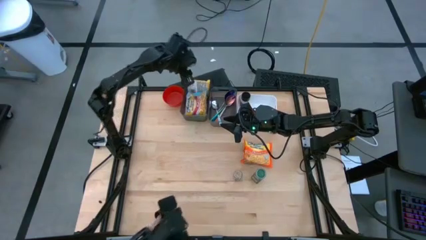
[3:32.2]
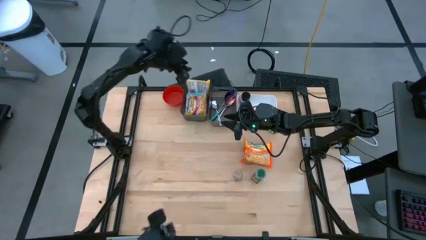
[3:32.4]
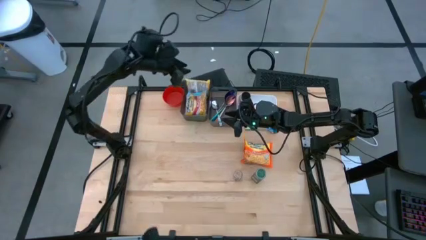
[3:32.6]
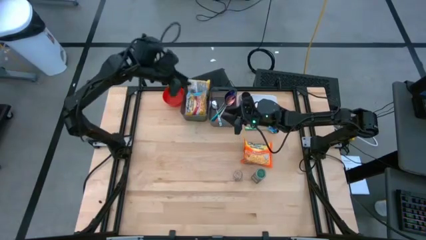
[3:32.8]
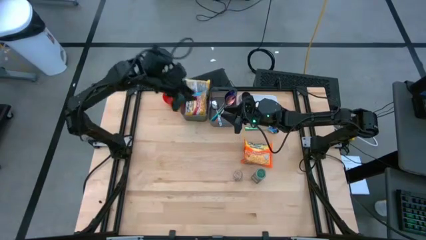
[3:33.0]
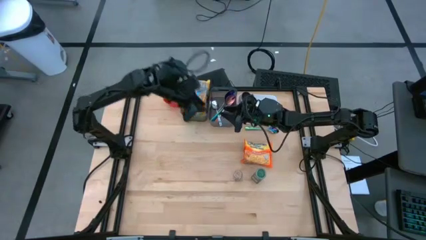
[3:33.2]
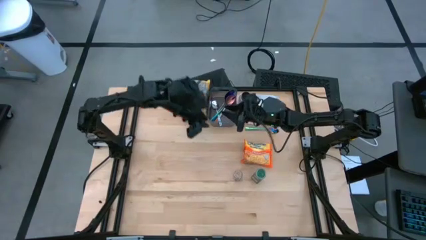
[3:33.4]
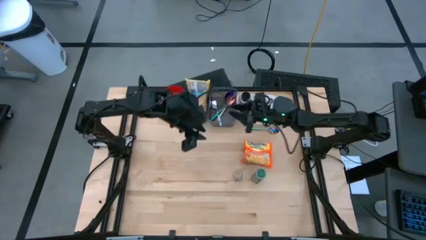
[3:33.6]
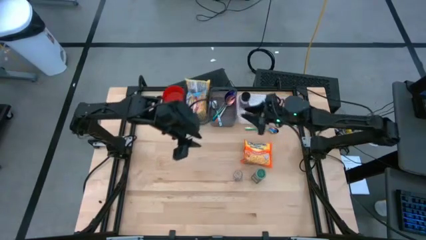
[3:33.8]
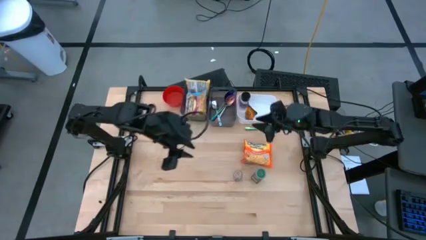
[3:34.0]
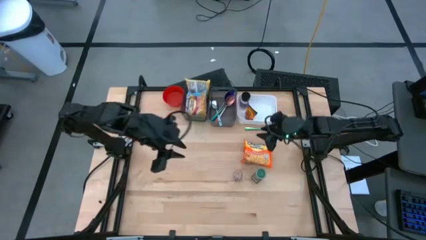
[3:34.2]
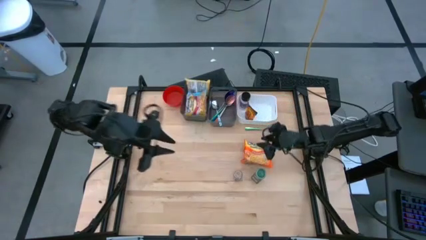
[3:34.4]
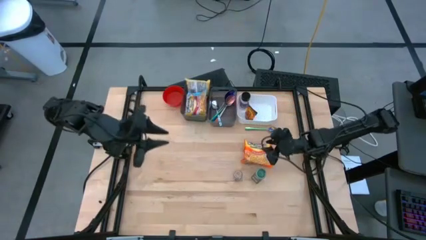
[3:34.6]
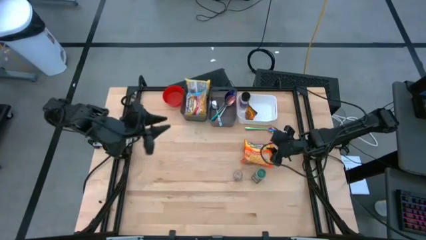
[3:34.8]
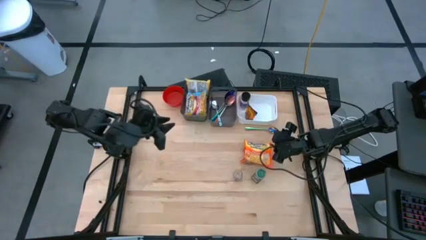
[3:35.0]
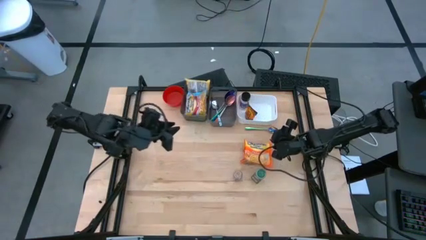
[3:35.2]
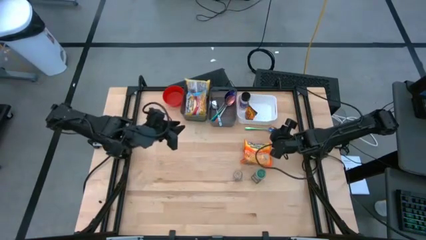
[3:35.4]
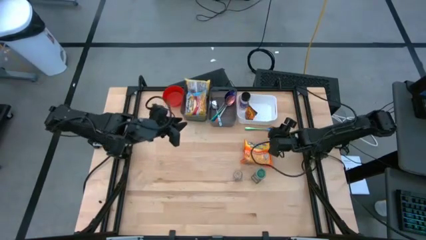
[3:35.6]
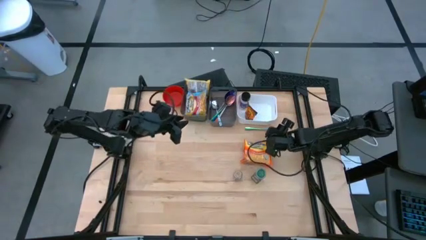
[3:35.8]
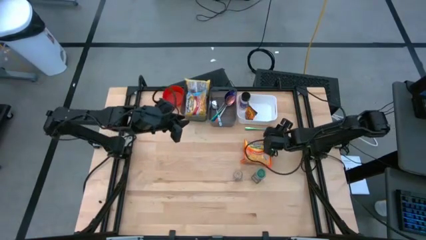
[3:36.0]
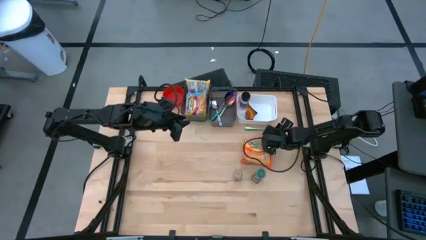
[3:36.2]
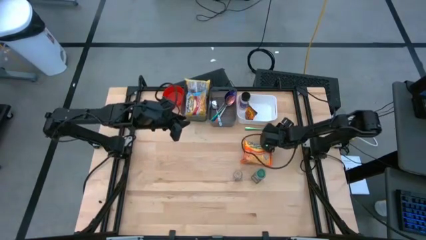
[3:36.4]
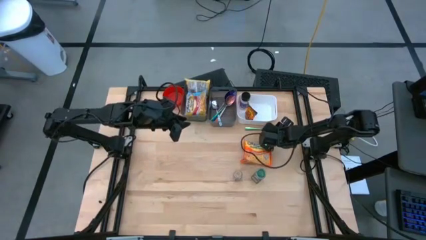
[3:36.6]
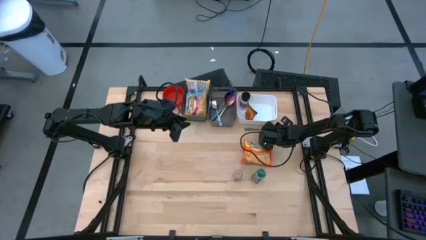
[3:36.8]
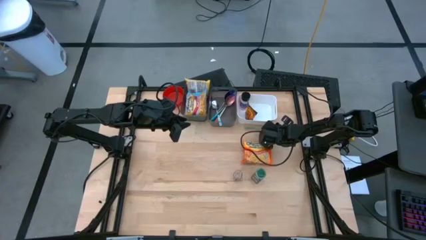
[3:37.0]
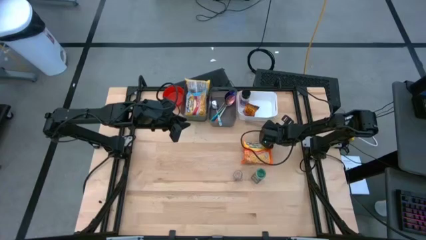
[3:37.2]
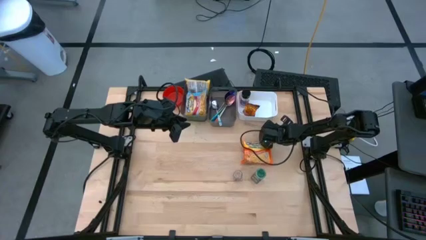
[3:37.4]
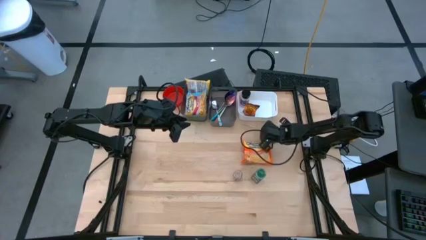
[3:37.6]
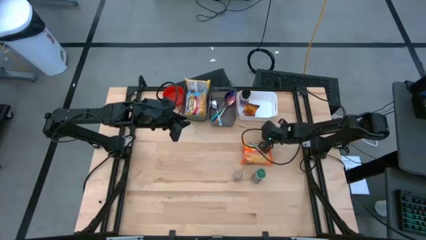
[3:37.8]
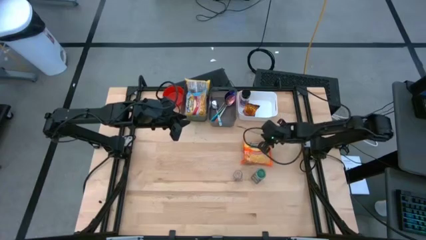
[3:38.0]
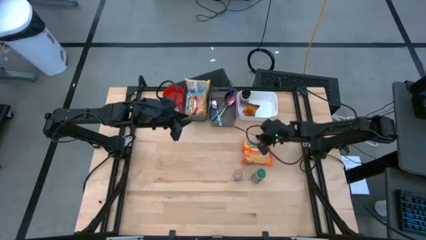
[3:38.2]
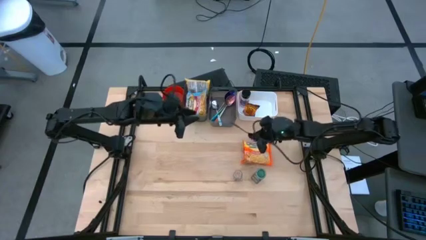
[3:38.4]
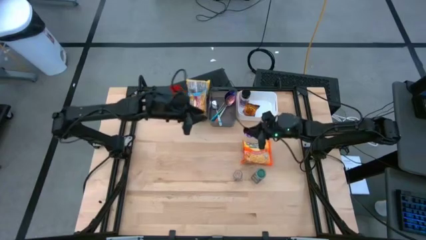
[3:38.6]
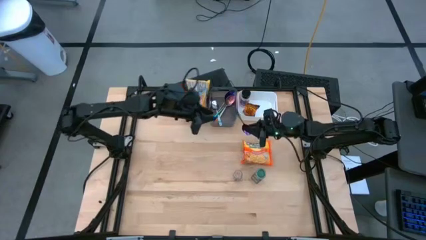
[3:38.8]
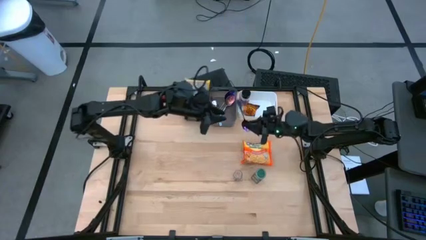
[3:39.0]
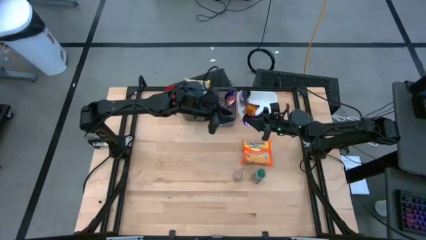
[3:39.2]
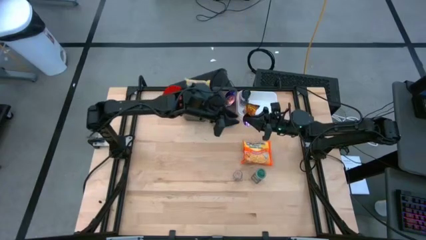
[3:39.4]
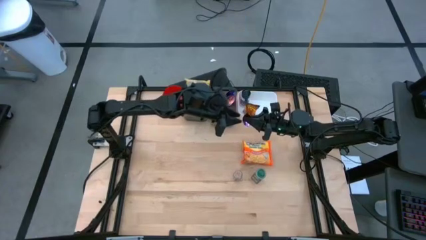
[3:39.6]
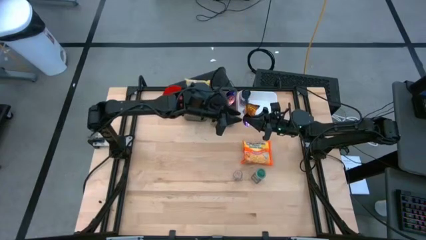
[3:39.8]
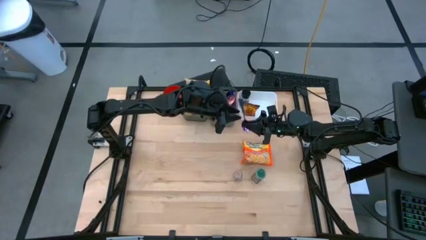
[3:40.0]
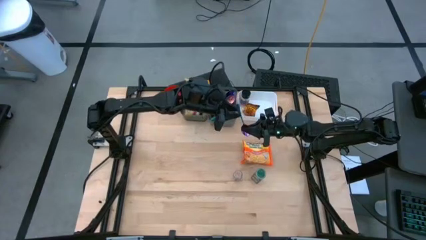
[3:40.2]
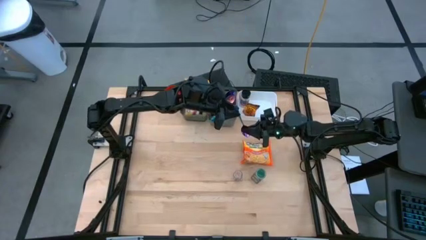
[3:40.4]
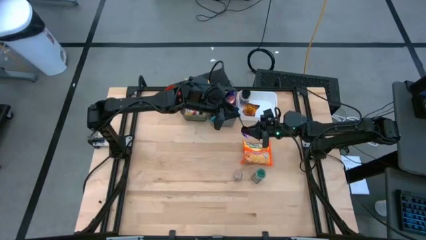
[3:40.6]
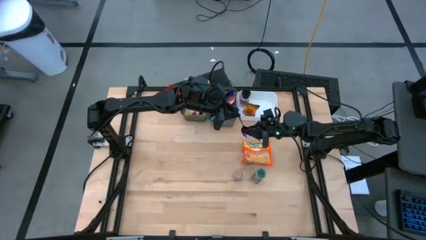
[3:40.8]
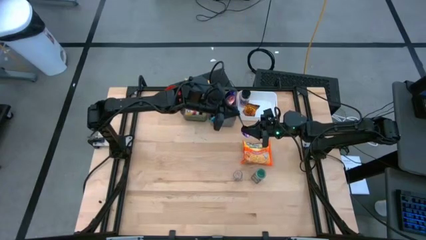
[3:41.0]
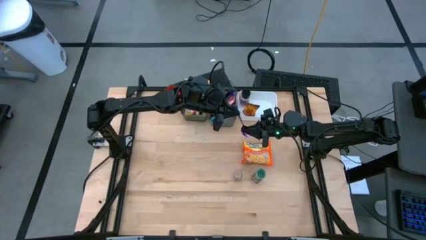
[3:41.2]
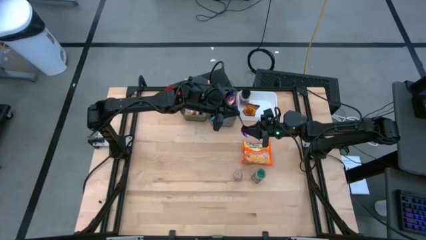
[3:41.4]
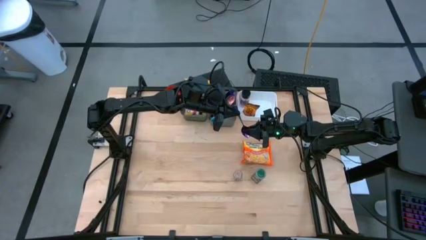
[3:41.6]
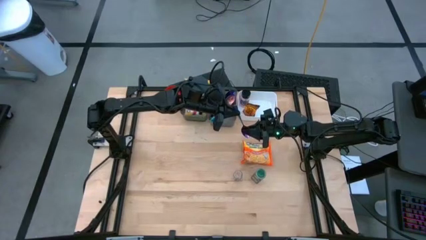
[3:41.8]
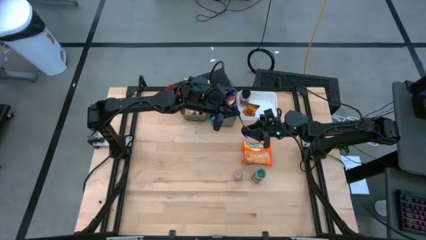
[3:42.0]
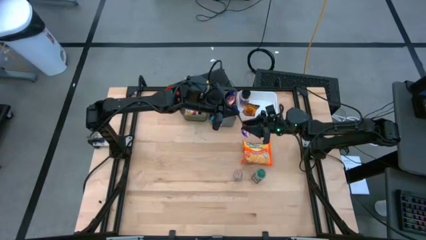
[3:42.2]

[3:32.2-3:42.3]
Task: Pick & Place Food Item
Put the violet spoon into the right black bin

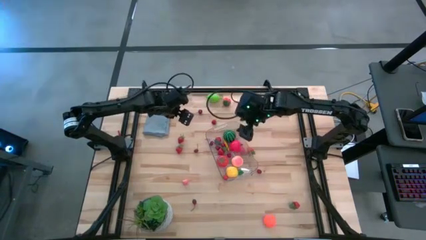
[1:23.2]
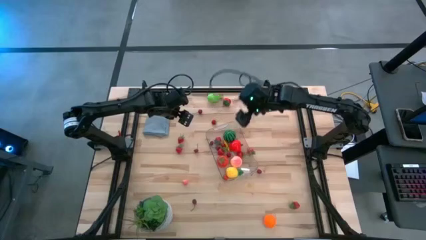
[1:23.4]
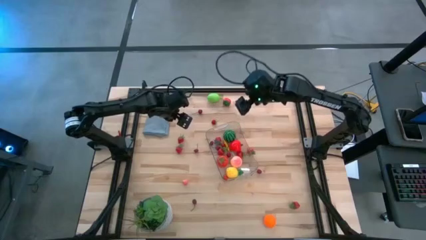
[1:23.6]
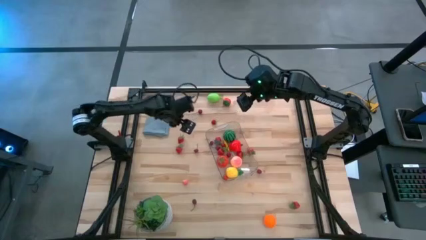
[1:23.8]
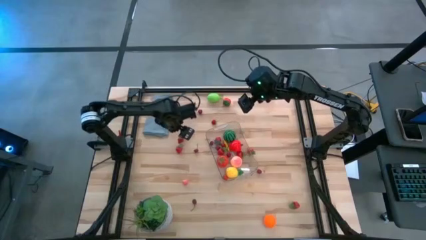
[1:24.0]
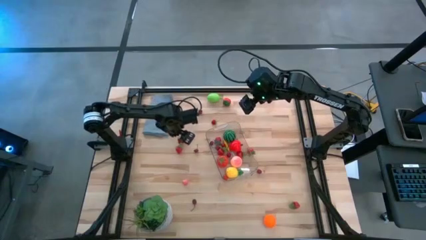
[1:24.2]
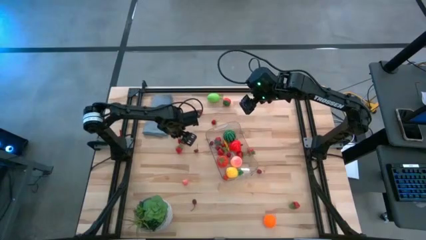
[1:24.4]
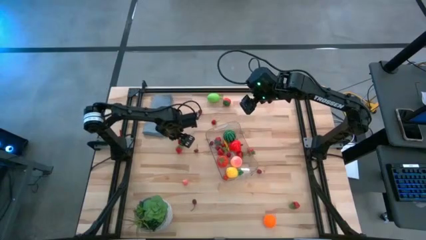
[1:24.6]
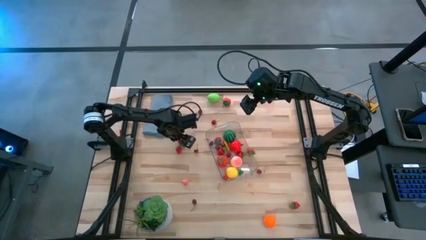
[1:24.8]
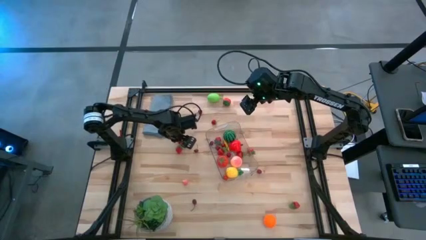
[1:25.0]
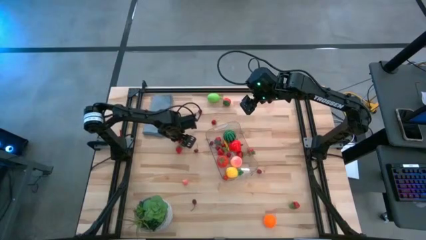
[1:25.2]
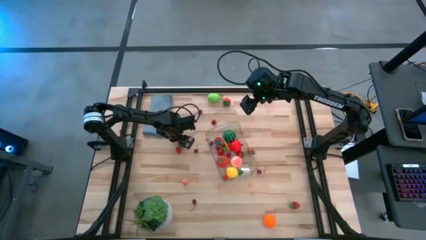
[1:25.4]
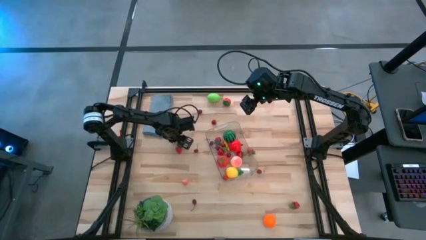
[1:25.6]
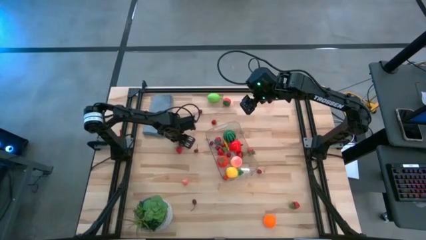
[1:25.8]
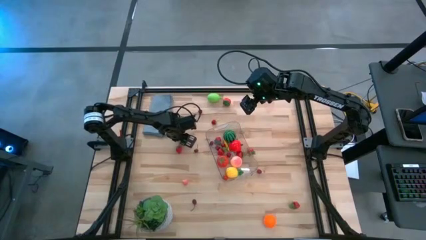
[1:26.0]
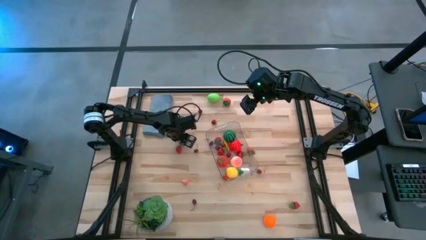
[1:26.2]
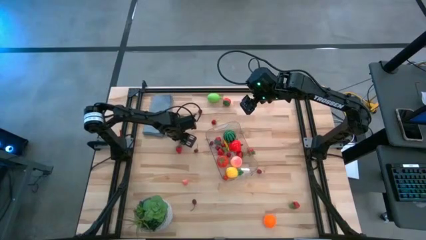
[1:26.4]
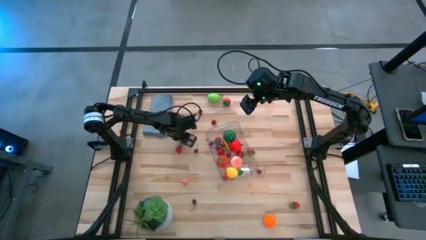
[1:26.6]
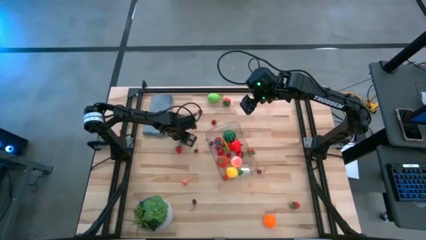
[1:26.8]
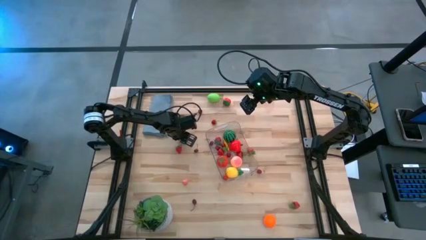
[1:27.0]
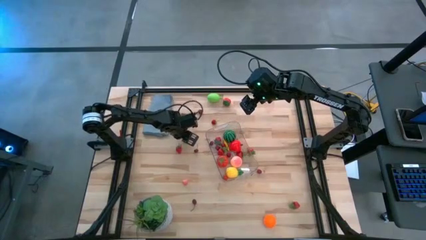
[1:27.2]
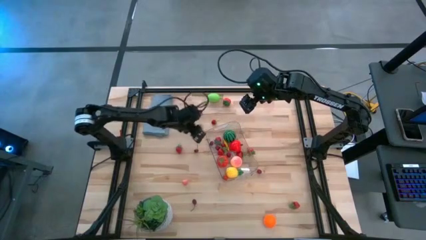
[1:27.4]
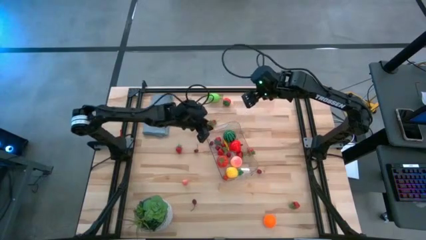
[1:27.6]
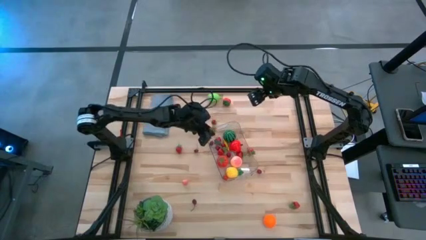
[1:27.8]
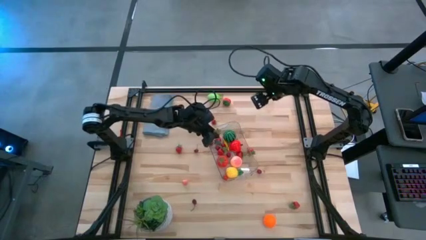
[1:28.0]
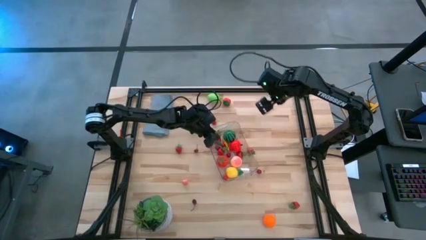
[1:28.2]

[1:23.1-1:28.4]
Task: Pick and placing Produce into tupperware
Put the red strawberry into the transparent bin

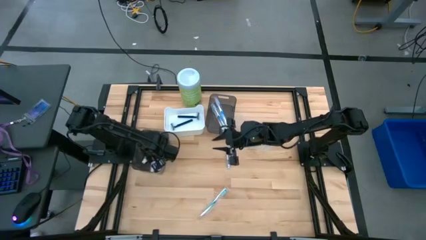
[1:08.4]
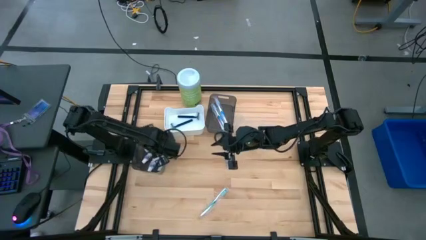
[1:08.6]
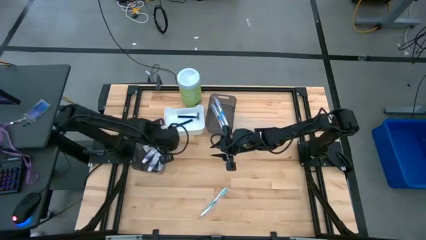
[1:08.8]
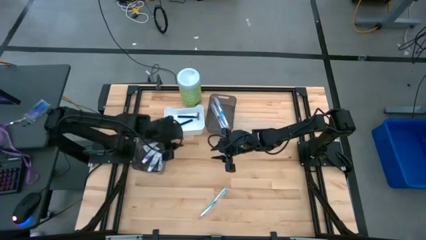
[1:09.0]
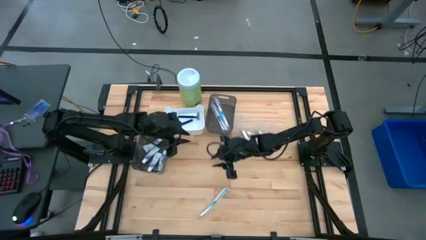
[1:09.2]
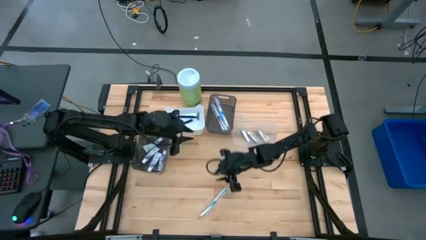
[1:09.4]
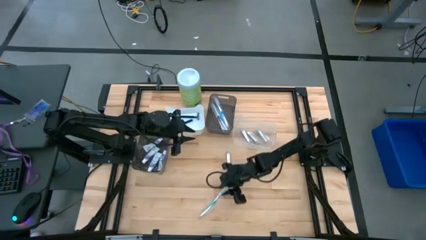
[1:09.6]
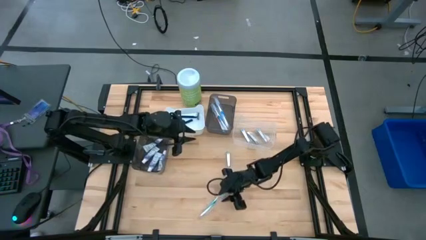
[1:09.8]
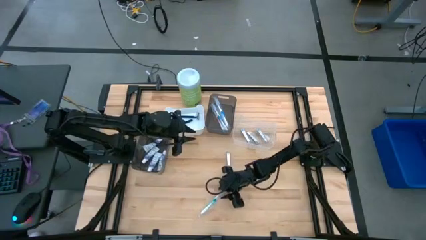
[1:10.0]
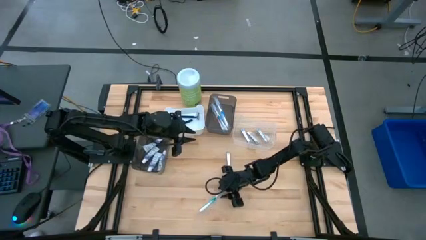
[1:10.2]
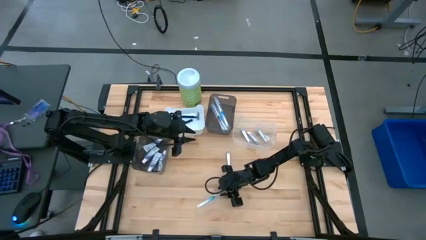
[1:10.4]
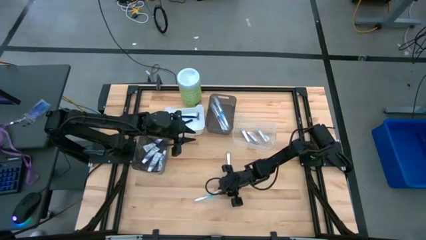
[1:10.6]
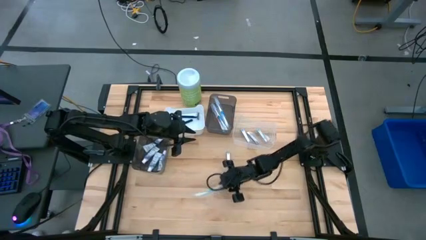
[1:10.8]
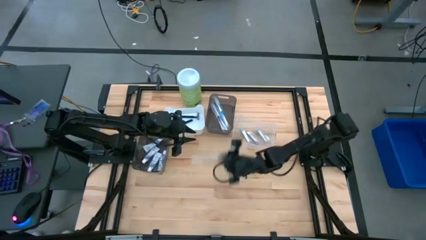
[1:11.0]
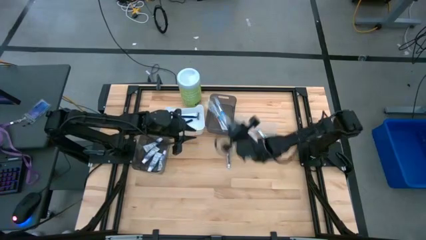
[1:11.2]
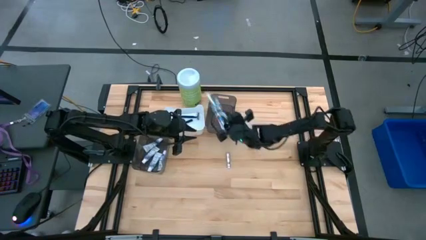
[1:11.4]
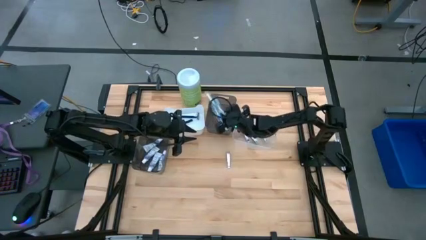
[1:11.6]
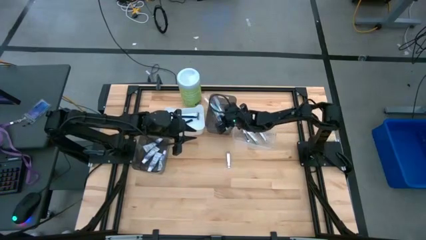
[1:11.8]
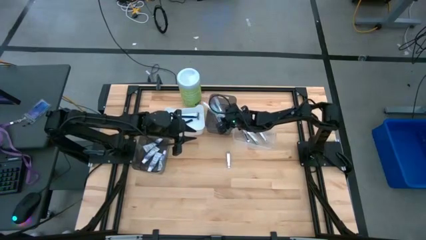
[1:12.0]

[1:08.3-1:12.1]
Task: Pick & Place Travel size toiletries
Put the green toothbrush into the top black bin
